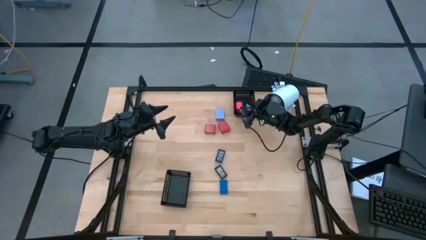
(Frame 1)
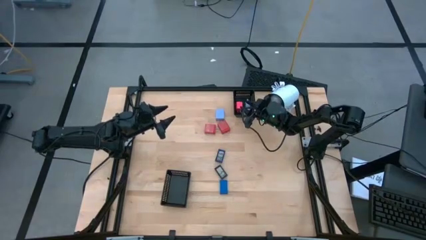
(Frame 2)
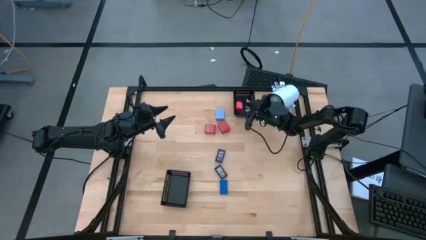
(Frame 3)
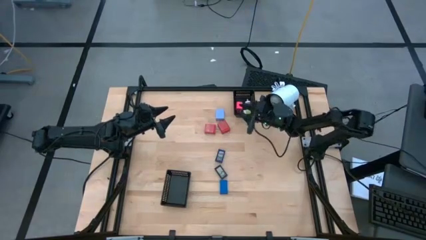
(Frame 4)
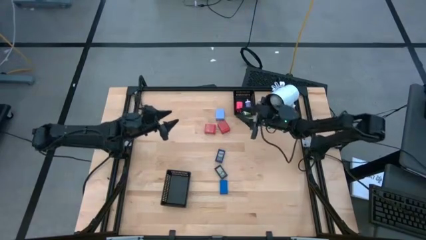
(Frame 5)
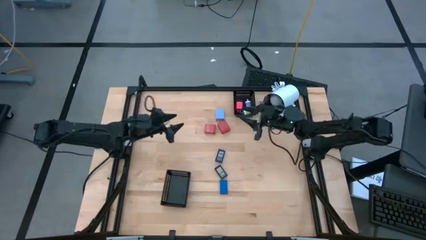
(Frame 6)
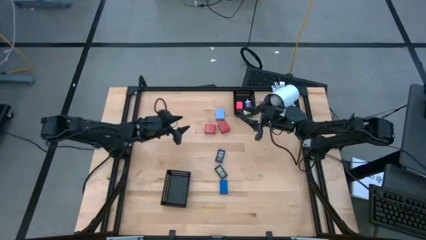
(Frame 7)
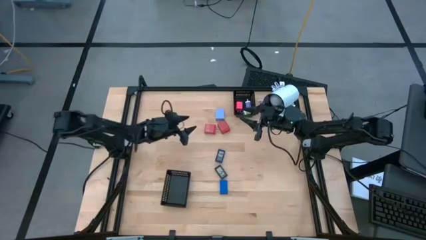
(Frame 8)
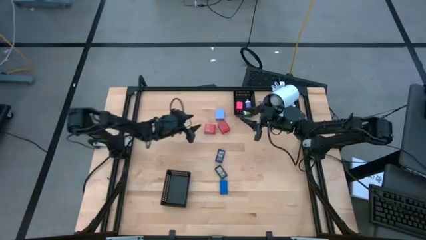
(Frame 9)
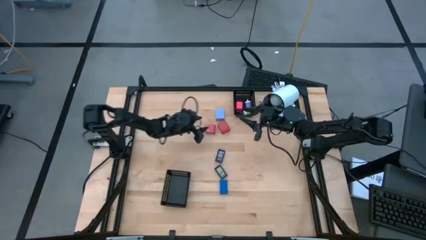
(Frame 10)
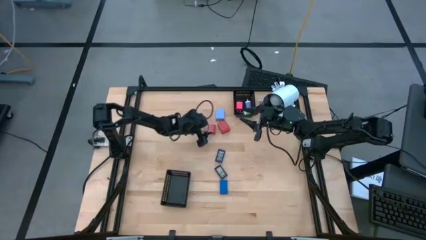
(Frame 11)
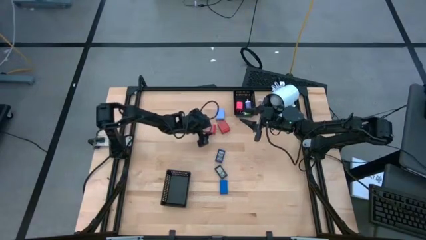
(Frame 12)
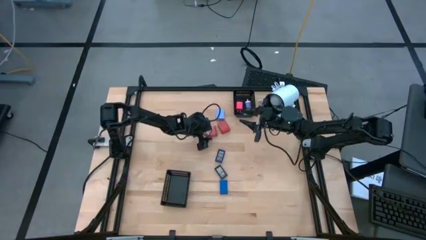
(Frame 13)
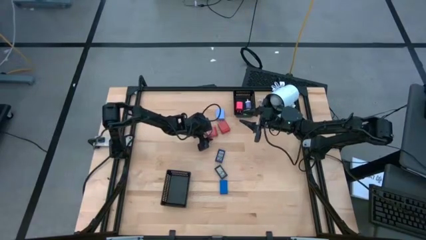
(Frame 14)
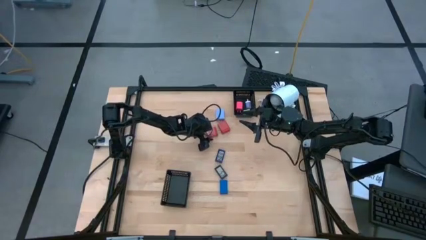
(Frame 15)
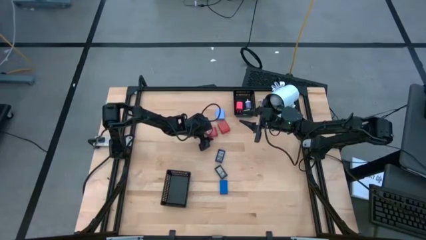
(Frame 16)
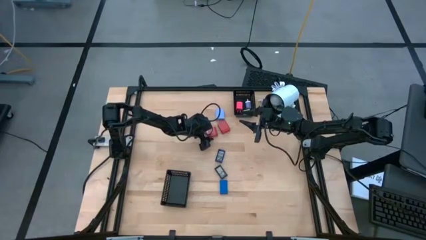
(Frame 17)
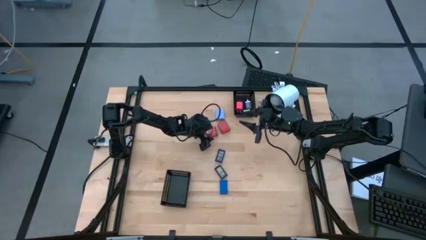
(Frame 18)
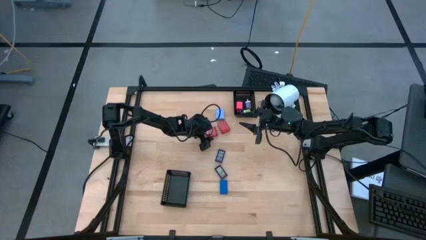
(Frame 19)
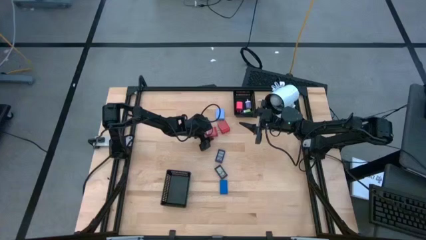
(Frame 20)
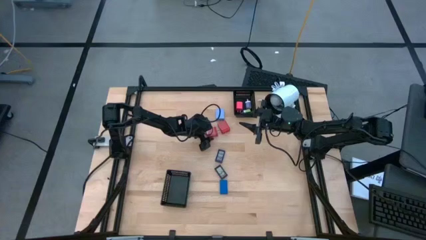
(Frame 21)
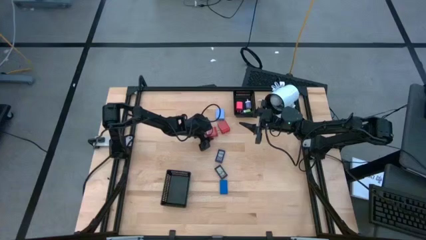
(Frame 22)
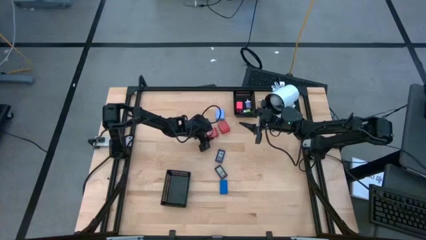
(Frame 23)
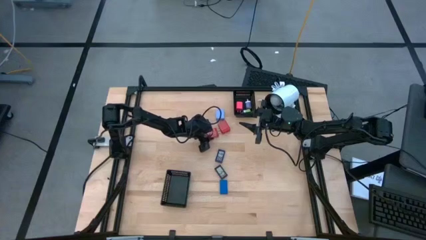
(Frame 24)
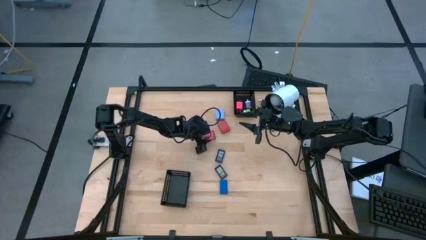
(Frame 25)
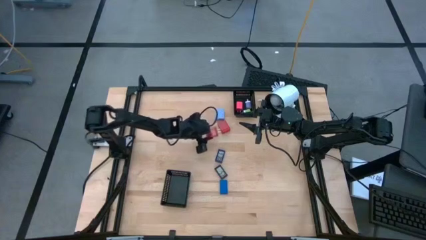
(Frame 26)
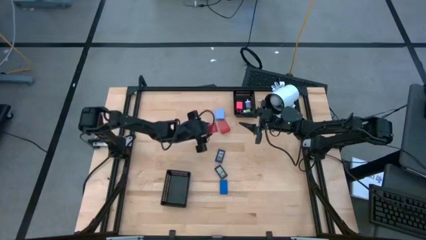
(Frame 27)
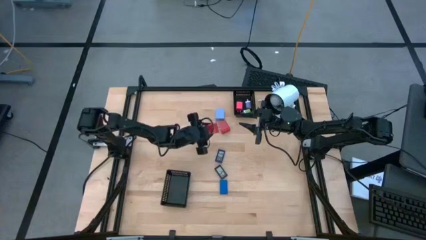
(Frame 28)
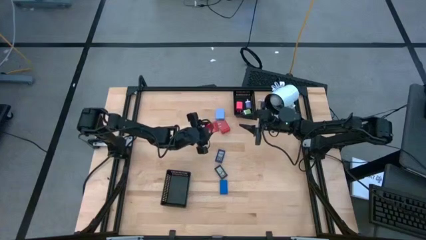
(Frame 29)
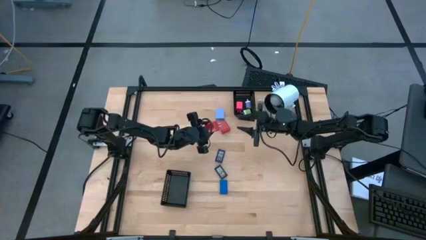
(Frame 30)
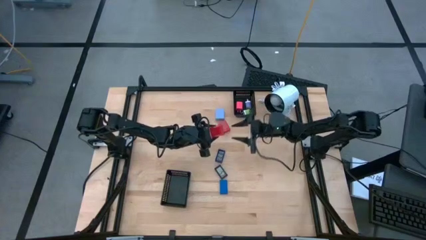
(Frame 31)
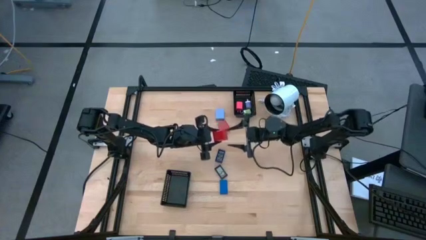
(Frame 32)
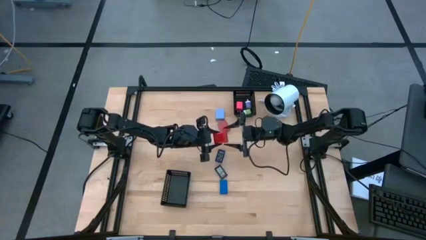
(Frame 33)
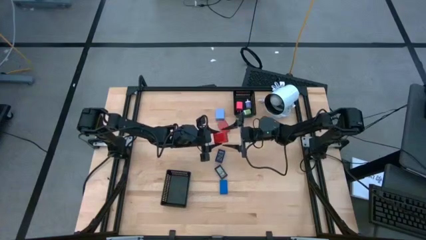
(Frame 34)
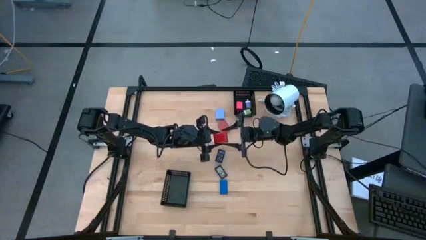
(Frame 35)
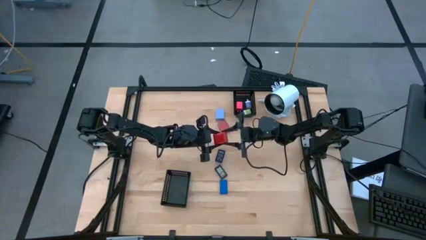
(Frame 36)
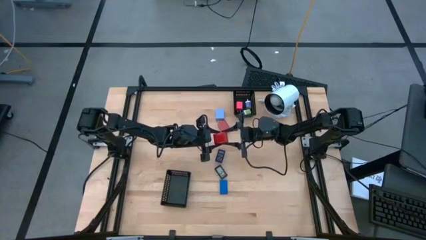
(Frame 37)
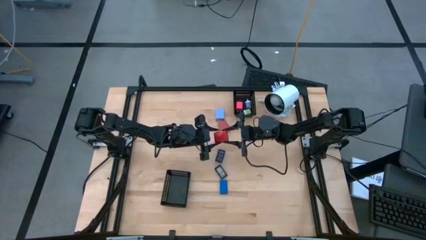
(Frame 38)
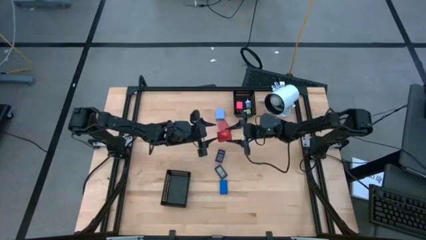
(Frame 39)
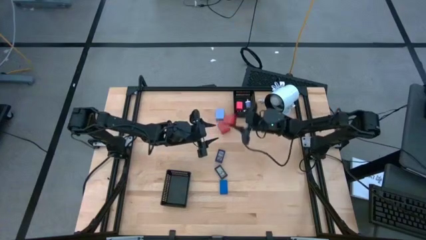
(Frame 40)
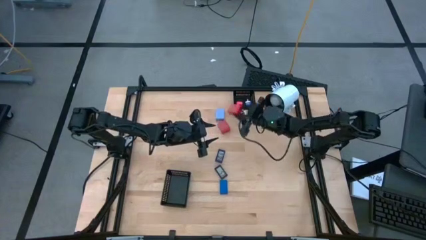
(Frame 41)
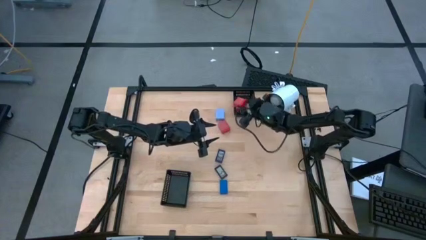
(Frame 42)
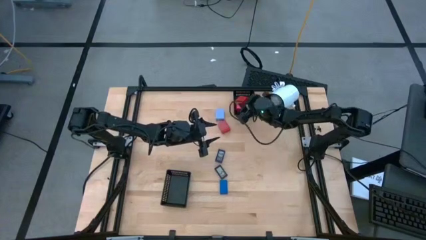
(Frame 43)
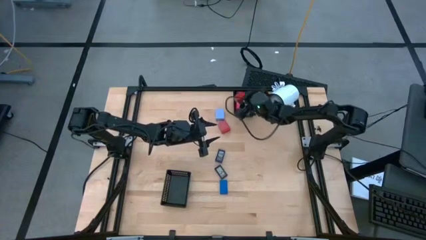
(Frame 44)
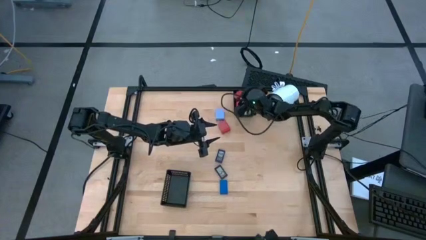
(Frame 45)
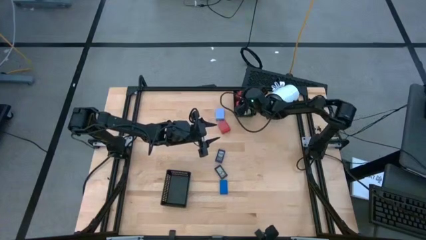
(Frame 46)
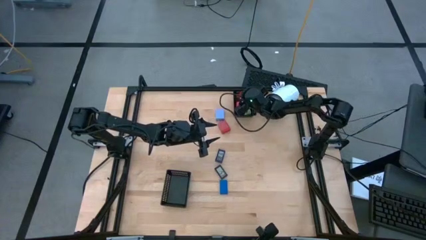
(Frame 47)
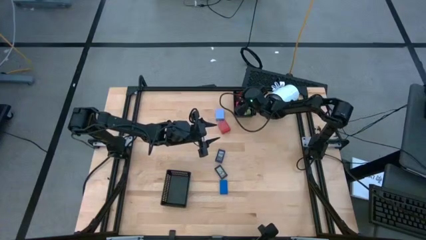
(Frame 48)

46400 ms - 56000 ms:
Task: Pick & Place Office items
Put the left red charger adapter into the top black basket

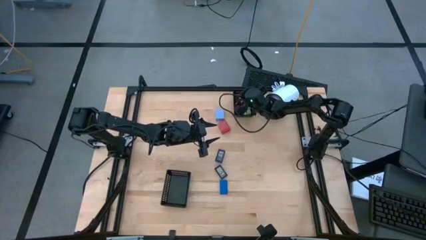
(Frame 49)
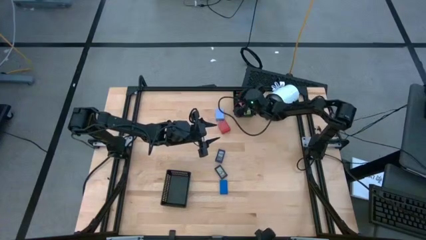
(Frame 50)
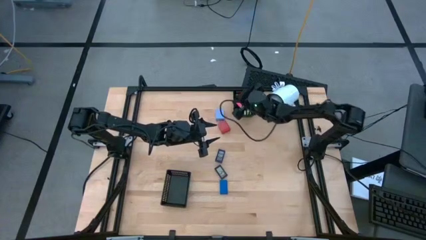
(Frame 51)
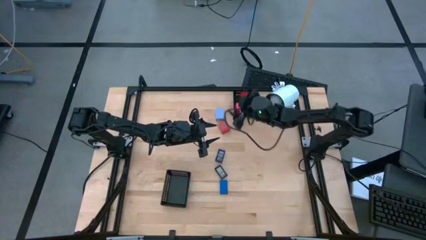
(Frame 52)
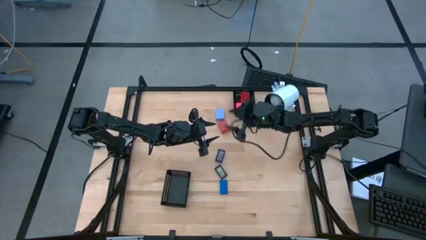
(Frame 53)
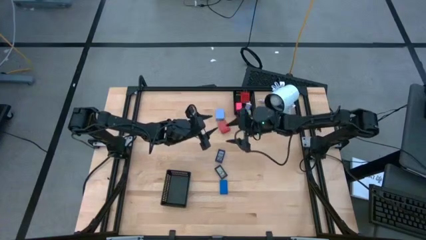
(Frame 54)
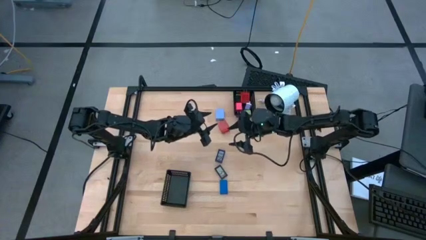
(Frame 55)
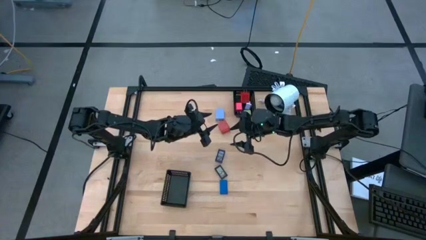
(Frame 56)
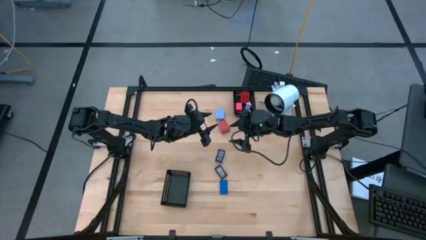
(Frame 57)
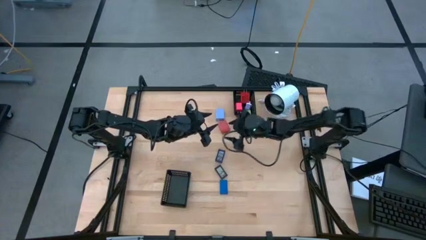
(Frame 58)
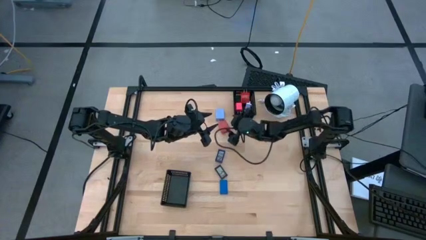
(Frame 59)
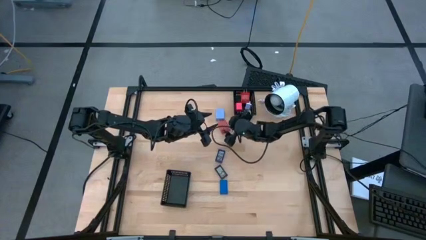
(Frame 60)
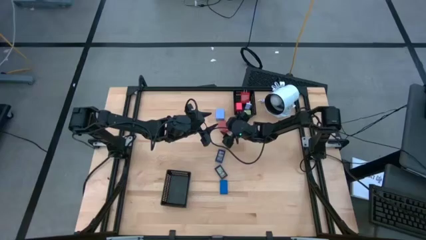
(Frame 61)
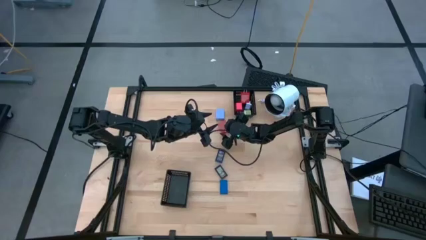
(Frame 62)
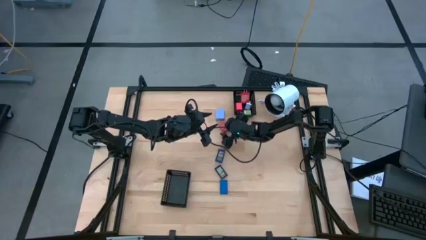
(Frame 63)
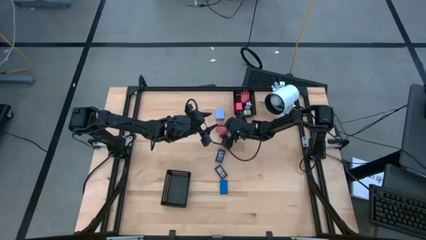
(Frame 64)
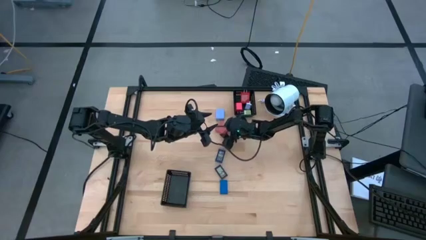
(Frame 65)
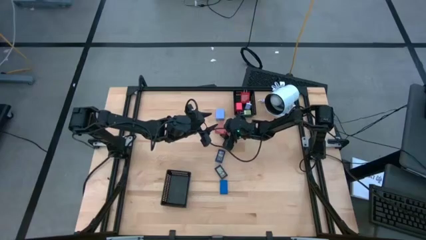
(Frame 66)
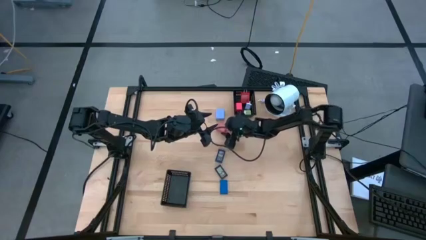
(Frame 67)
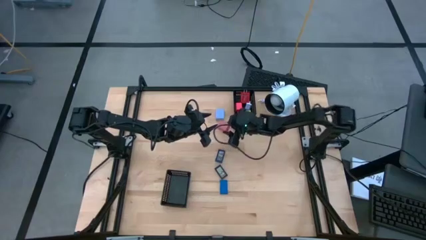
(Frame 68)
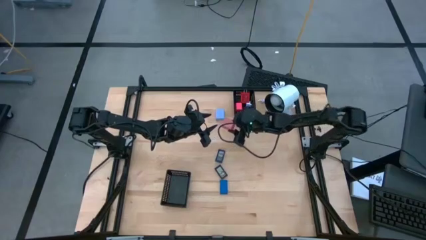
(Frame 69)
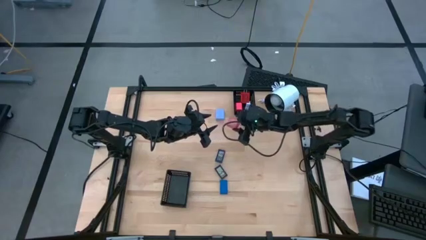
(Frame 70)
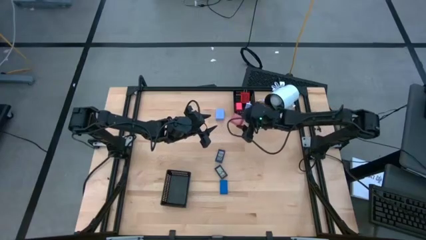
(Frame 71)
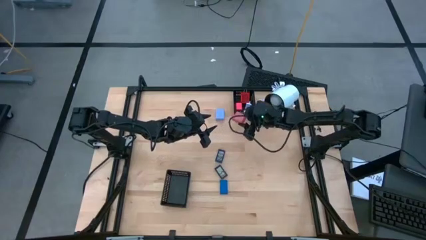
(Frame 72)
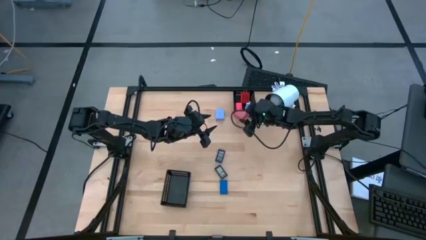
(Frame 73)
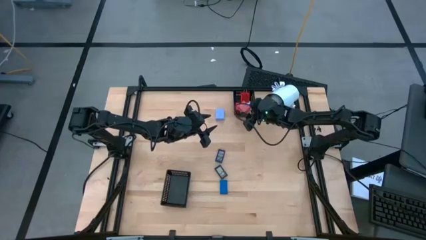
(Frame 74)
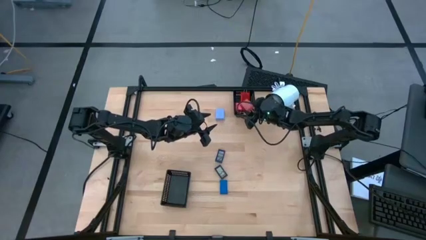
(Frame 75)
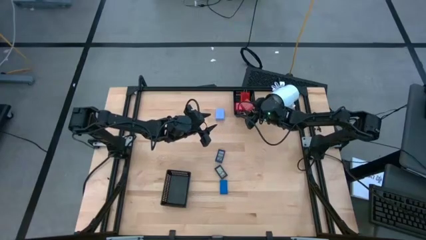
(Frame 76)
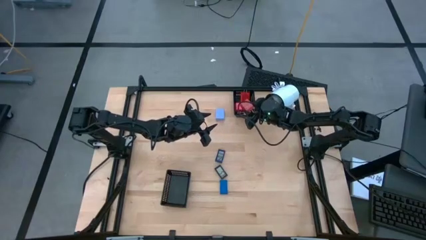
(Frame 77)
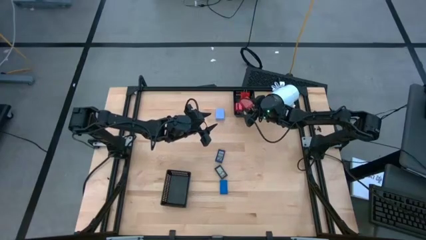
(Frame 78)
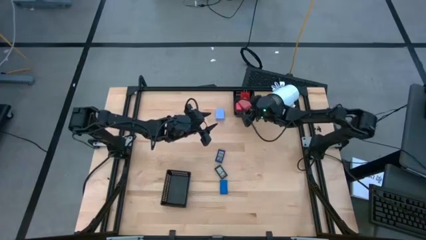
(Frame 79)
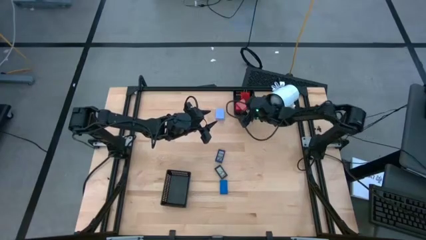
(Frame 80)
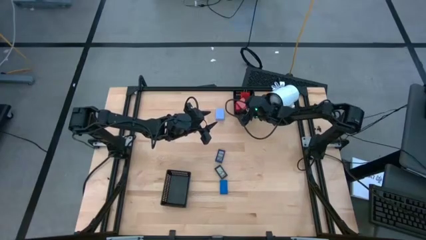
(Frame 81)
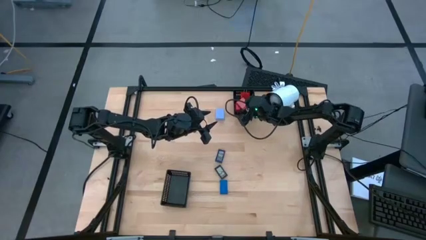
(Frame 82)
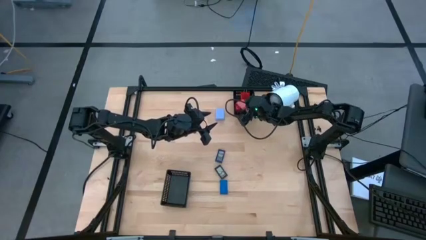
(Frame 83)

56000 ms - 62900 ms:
Put the red charger adapter into the top black basket
